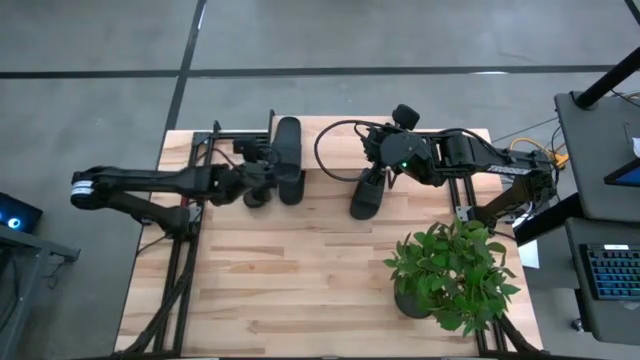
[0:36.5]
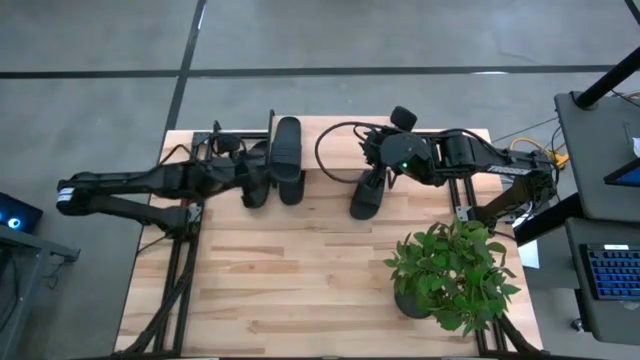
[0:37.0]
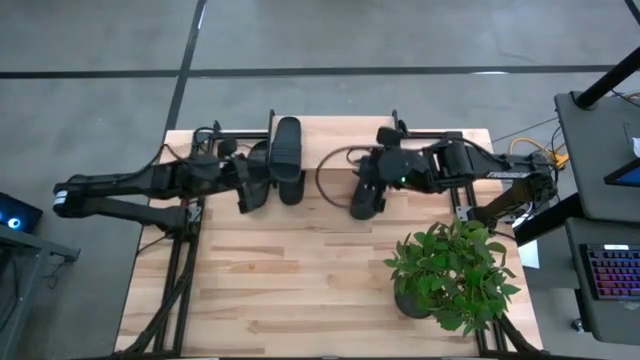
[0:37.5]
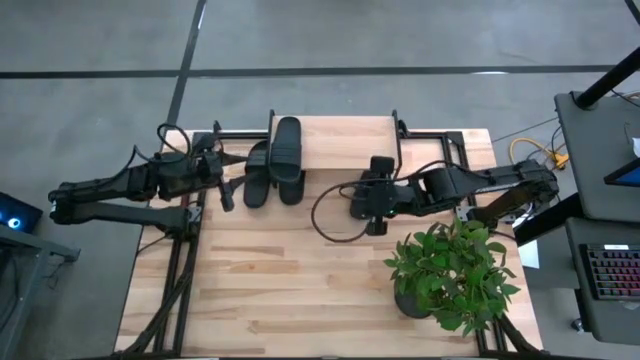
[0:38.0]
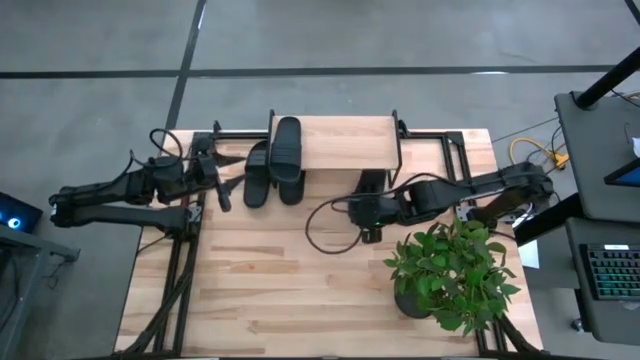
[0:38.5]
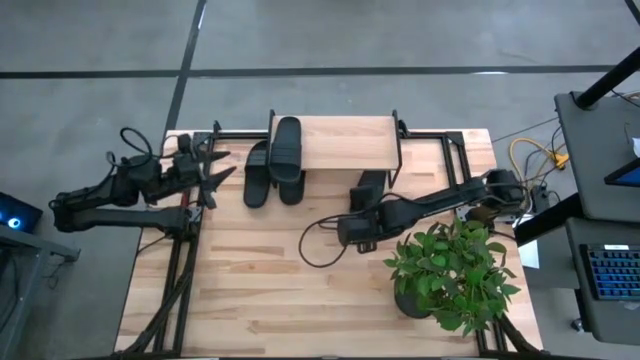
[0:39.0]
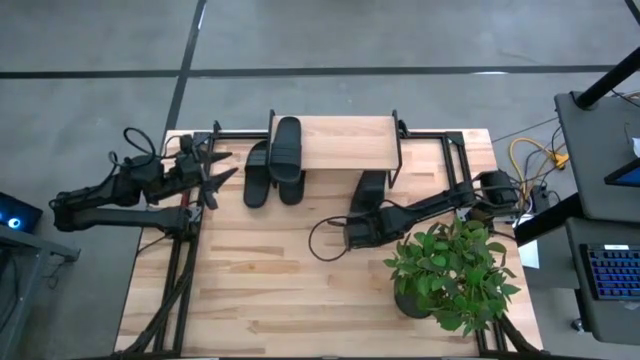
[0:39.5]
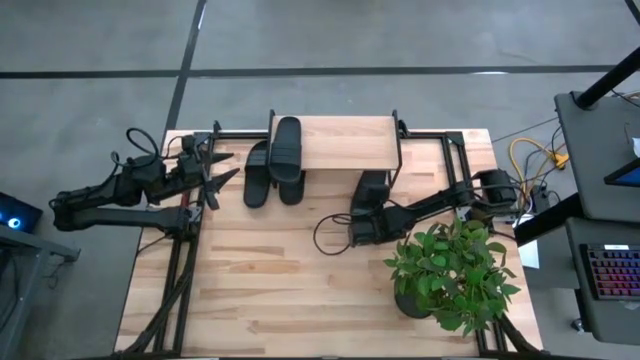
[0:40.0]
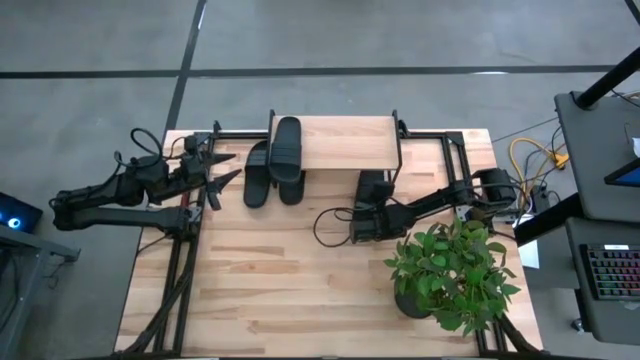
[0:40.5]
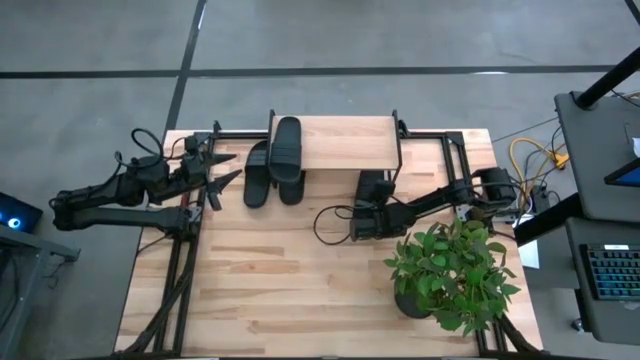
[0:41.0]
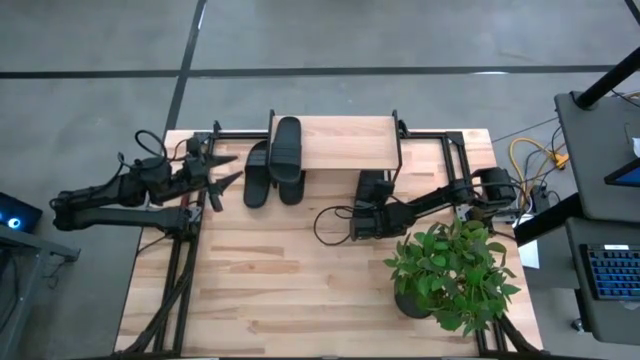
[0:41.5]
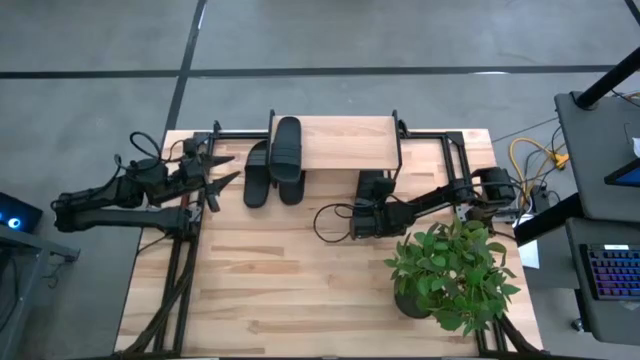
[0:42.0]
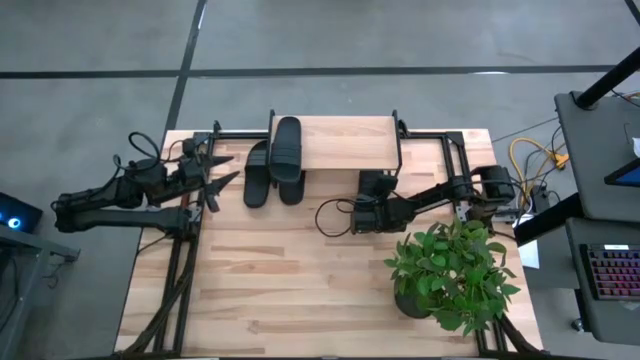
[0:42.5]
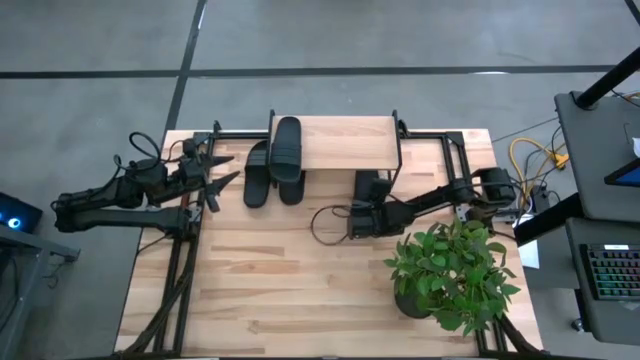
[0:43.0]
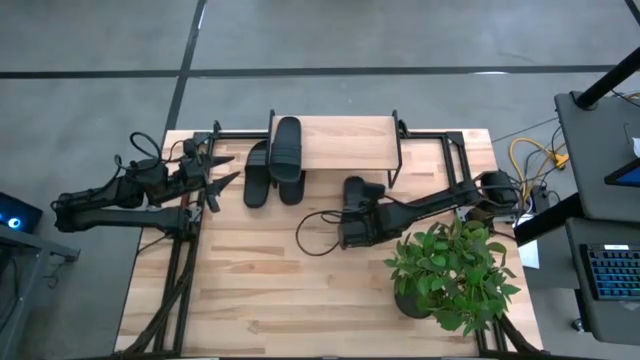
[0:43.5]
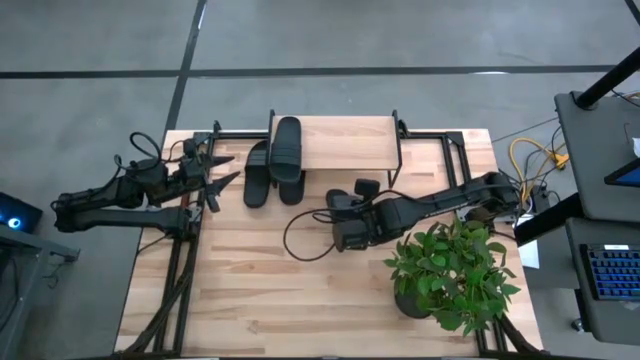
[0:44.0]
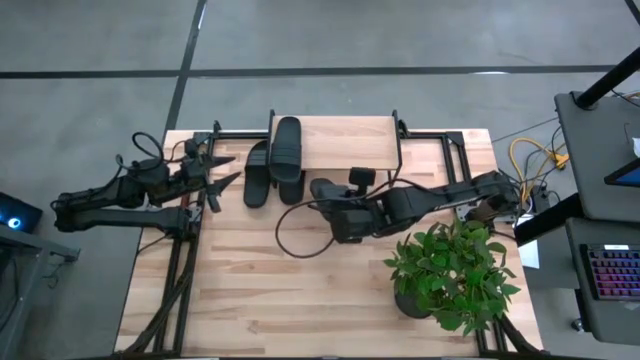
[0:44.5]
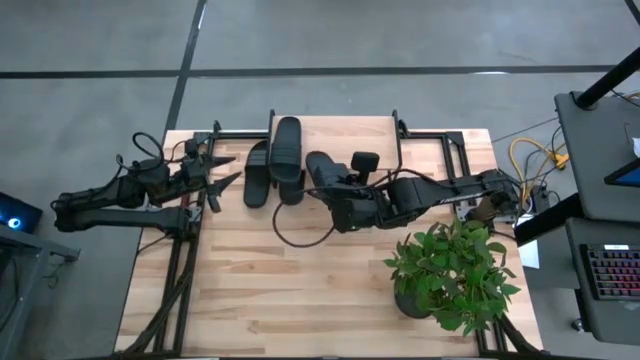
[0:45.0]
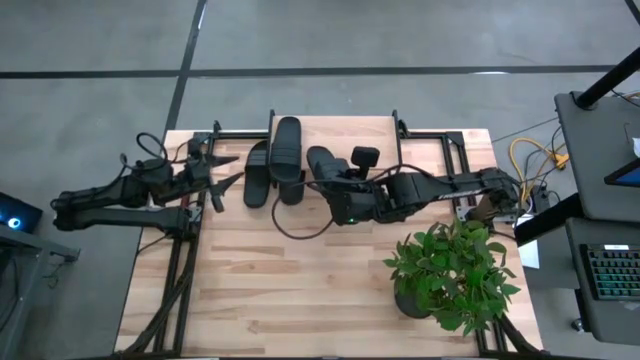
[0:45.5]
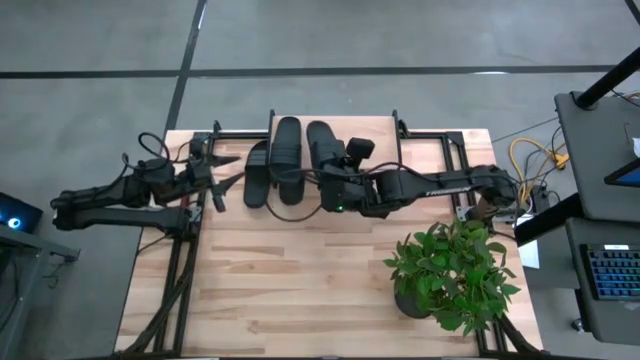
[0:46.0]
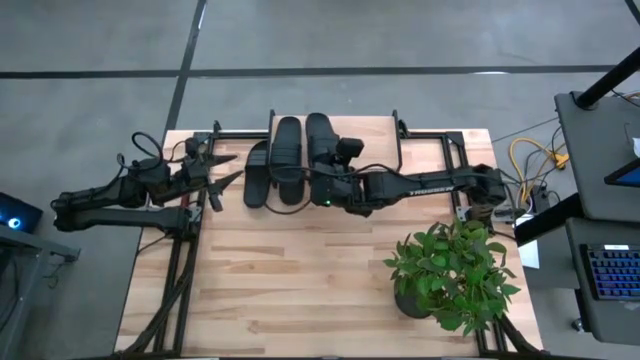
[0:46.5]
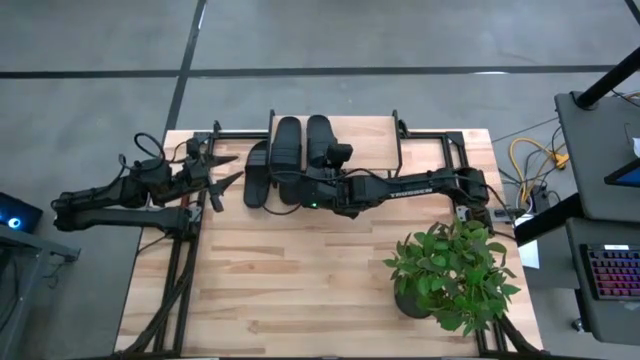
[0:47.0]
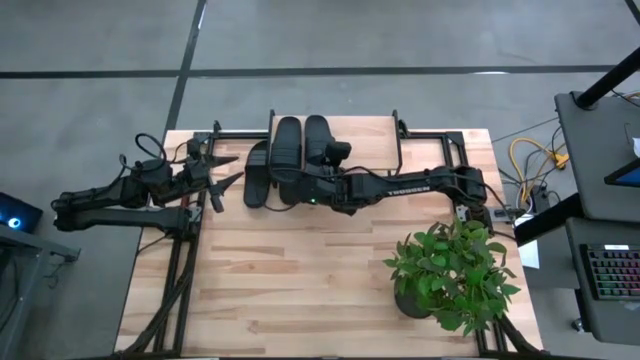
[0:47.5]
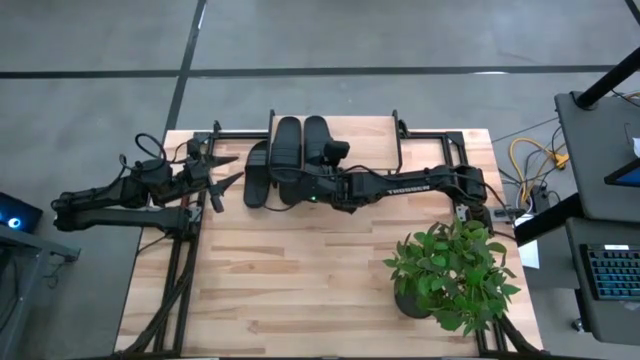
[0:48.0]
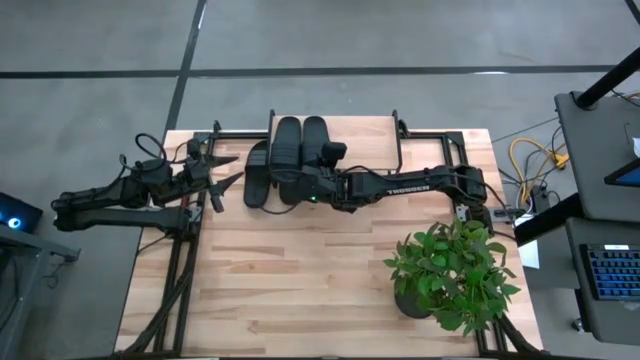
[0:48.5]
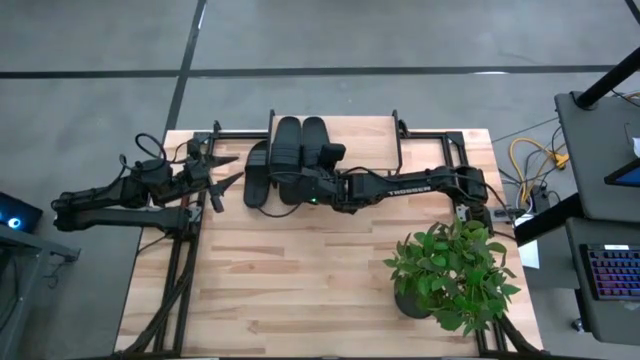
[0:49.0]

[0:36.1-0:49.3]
Task: Pick and place slides into the shelf
Put the black slipper on the shelf

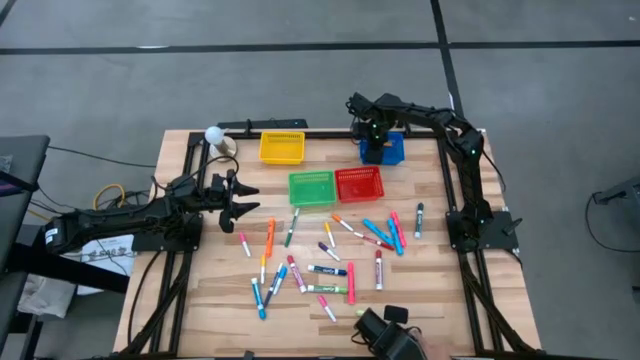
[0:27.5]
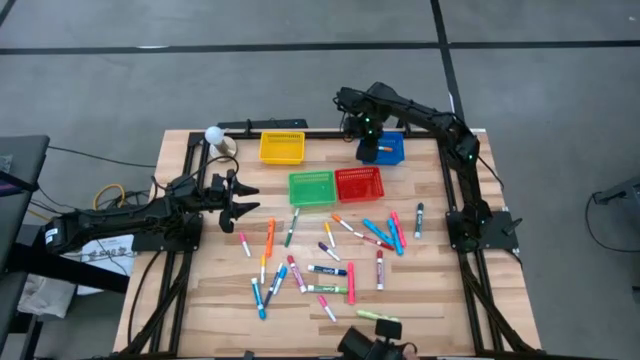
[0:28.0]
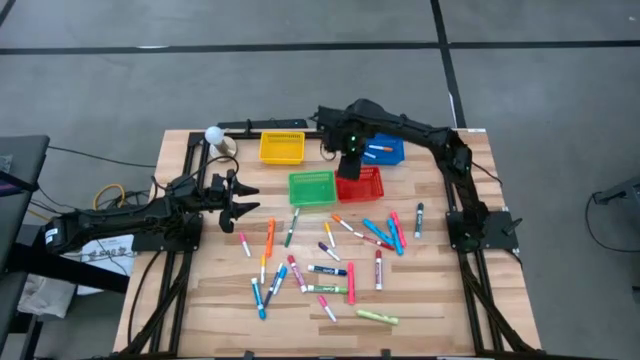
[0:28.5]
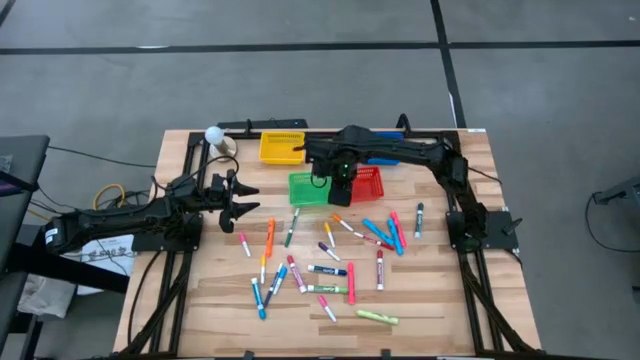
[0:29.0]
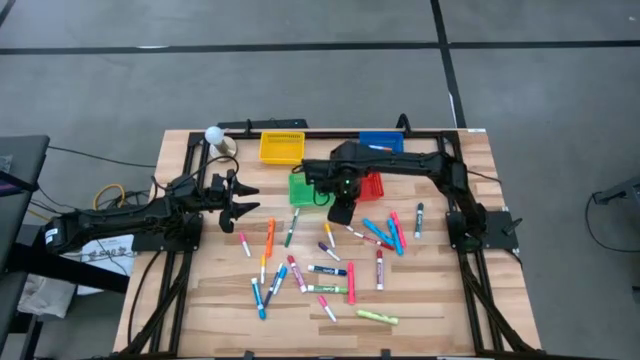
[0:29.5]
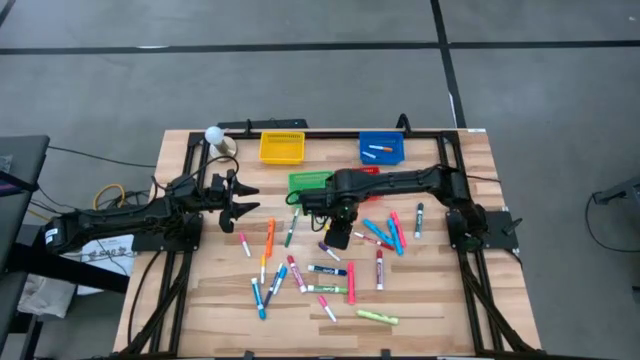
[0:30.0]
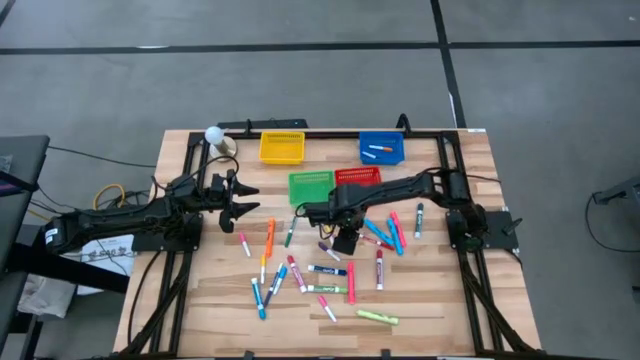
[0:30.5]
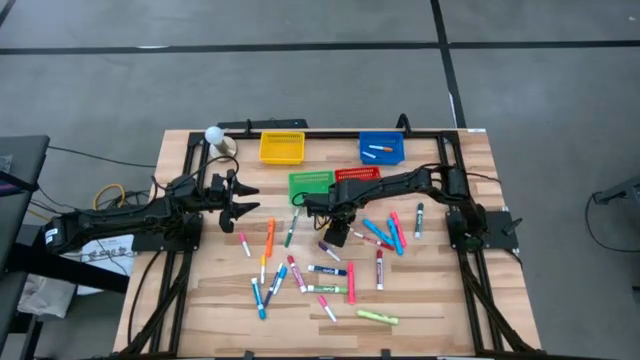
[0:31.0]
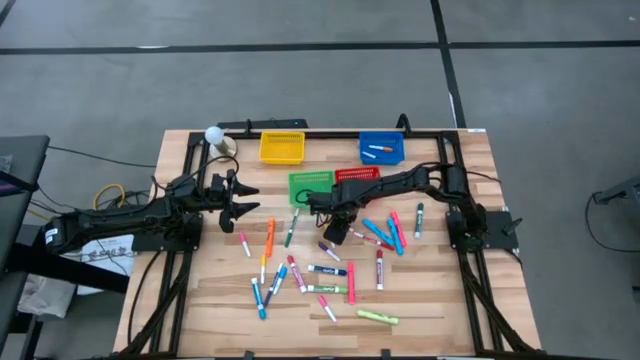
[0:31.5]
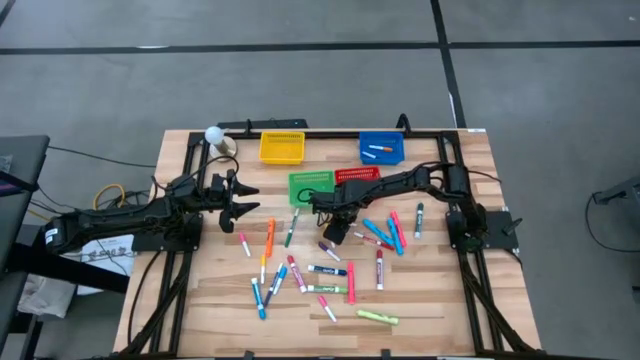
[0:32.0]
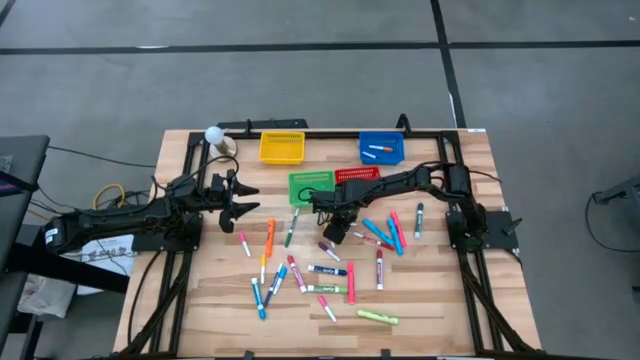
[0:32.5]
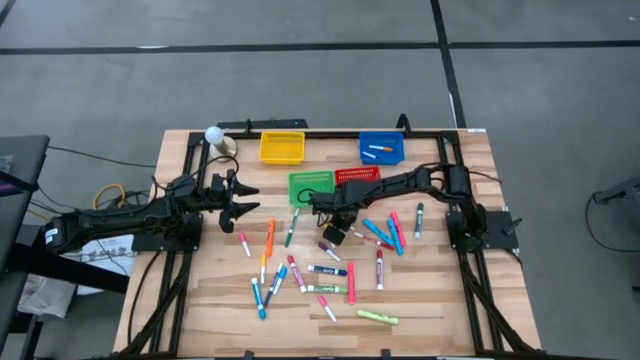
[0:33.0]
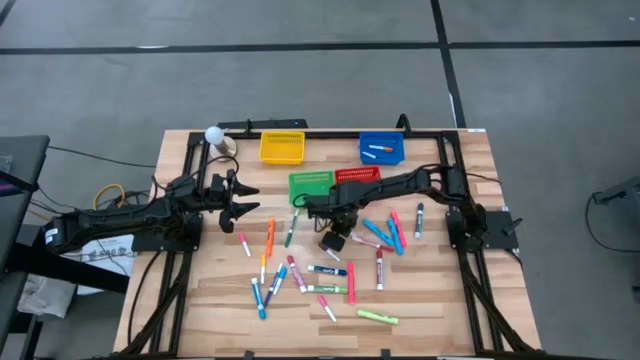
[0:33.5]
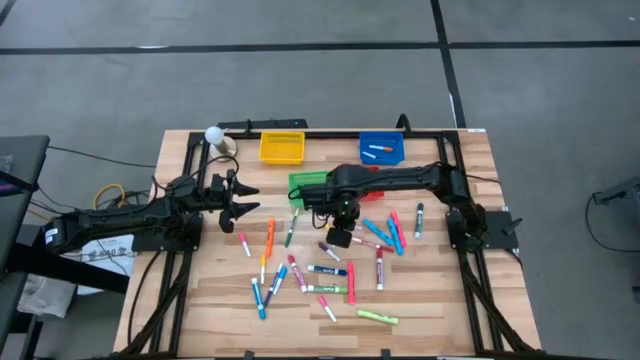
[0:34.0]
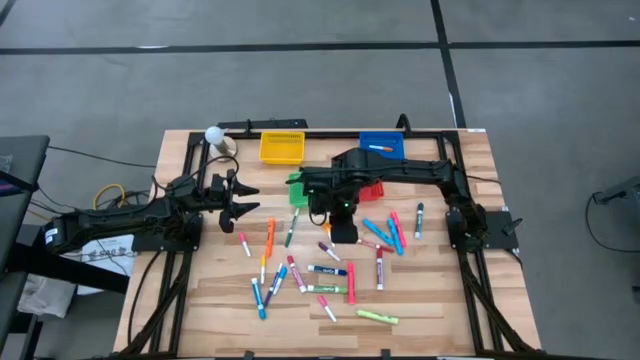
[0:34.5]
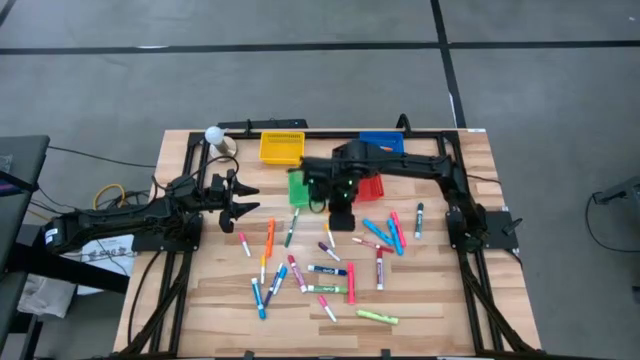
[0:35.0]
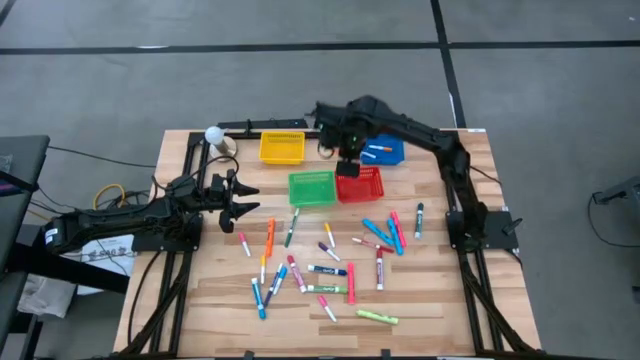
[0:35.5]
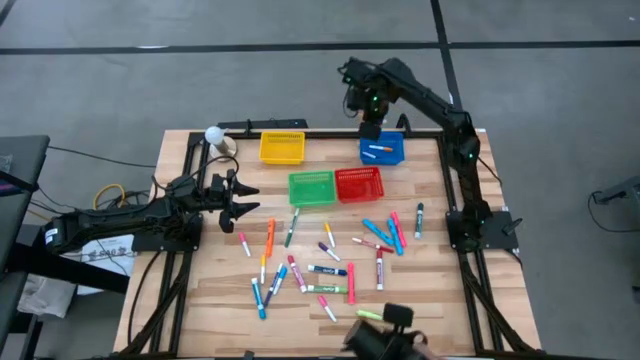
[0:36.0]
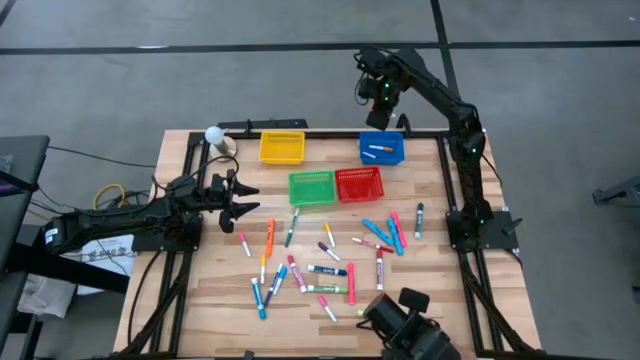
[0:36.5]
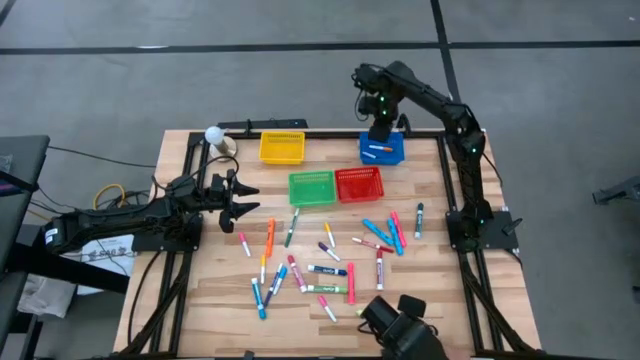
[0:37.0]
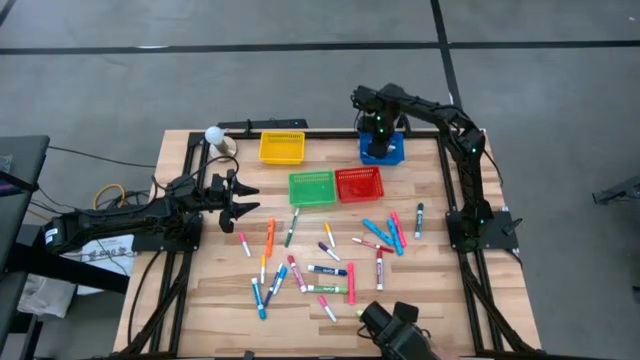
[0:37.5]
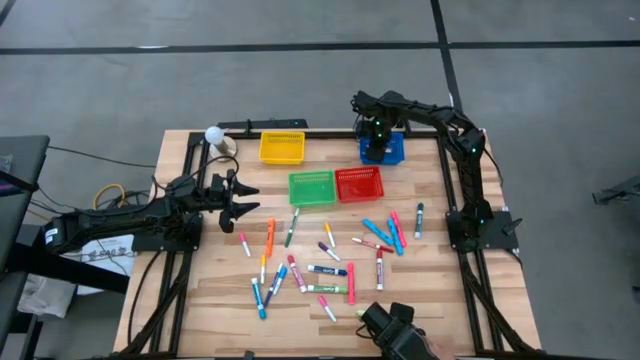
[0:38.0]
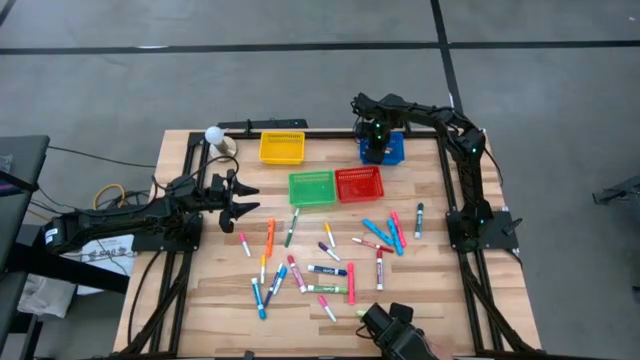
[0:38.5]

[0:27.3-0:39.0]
Task: Pick & Place Markers
Put the small orange highlighter pen into the blue bin
